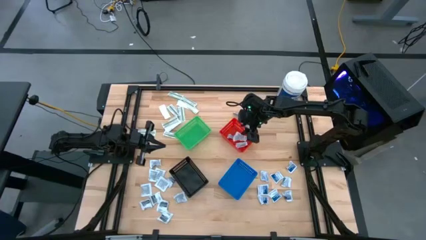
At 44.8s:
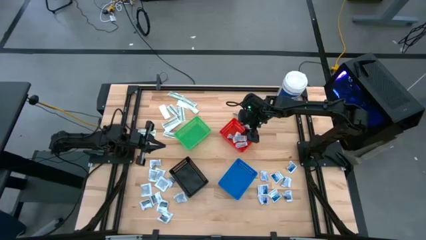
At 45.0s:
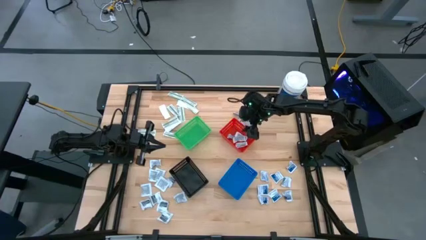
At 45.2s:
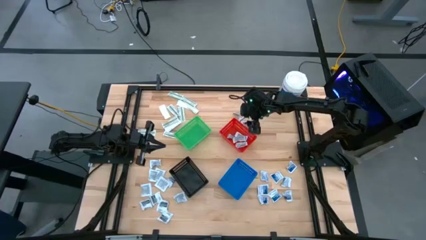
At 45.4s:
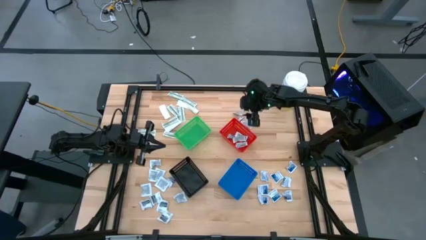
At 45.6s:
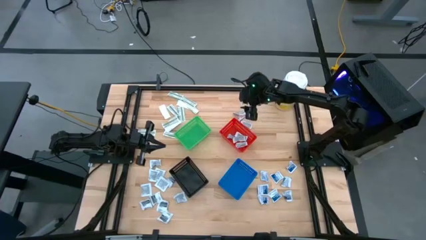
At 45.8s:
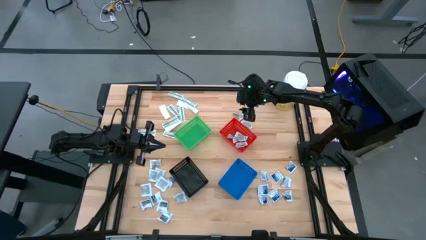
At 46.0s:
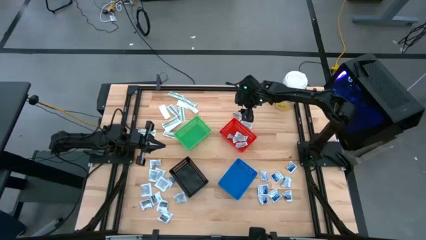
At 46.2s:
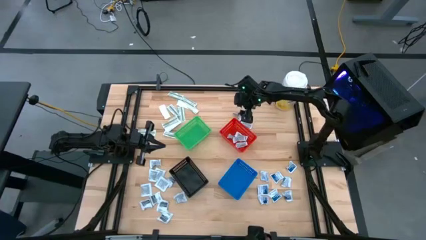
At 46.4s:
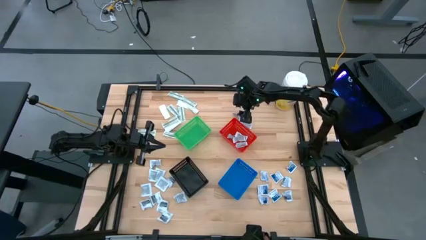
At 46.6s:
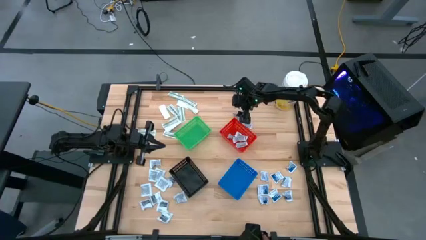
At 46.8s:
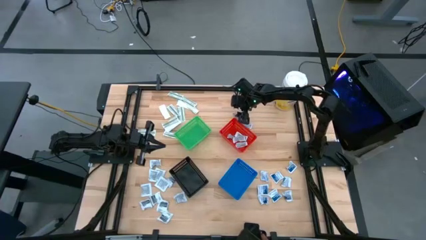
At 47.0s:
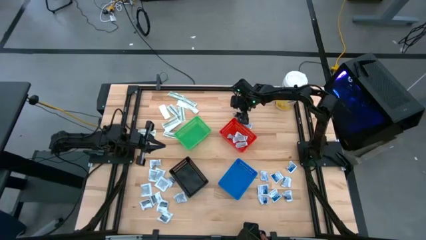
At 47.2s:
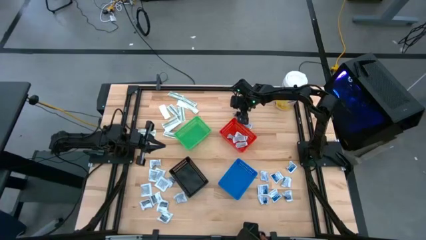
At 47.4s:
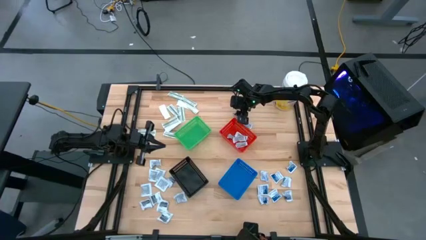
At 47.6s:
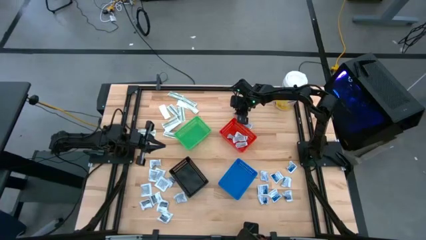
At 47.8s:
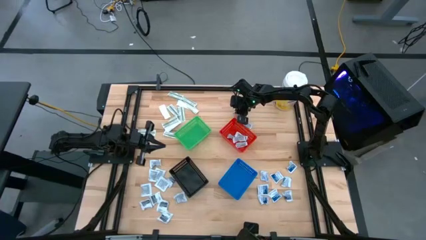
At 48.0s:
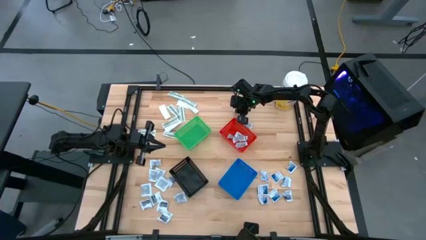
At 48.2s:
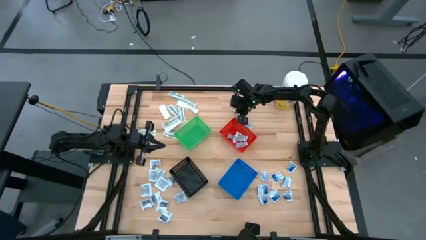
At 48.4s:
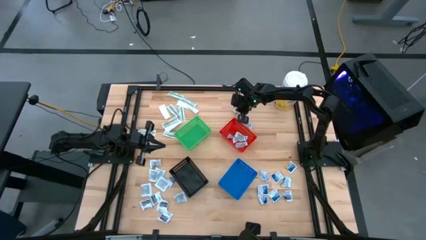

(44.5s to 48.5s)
Task: Pick & Place First Aid Supplies
Put the orange ointment pack into the red bin

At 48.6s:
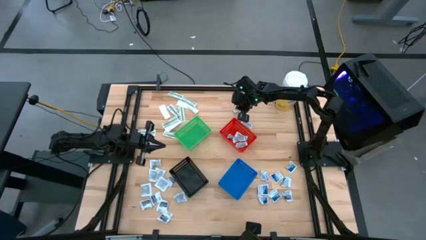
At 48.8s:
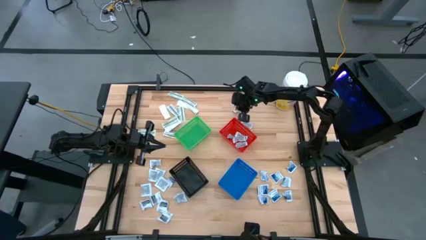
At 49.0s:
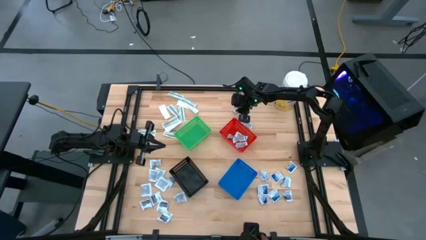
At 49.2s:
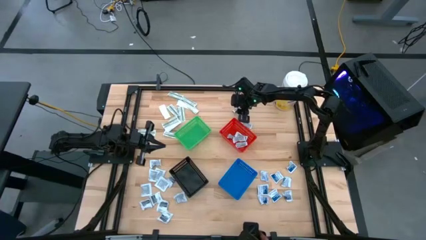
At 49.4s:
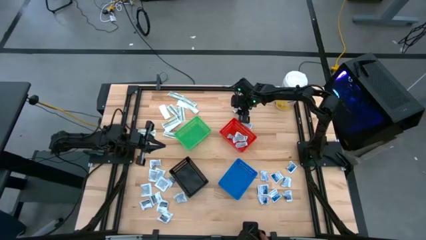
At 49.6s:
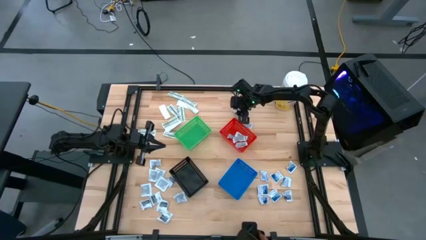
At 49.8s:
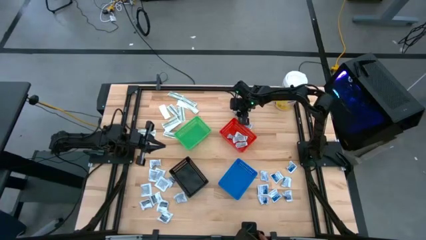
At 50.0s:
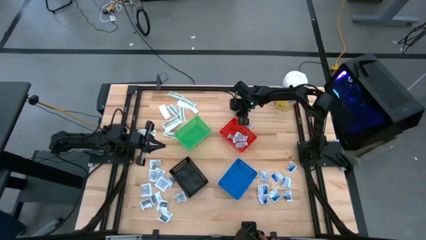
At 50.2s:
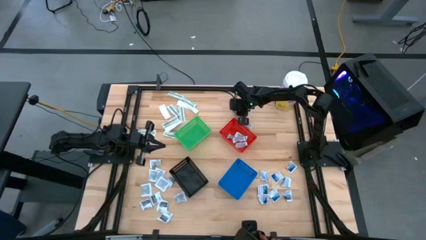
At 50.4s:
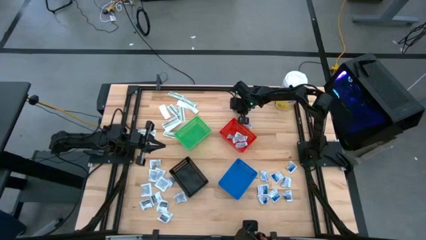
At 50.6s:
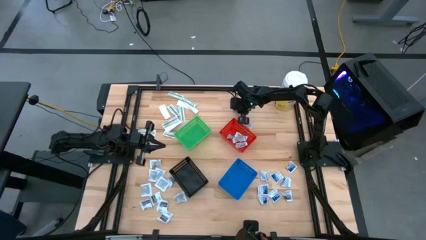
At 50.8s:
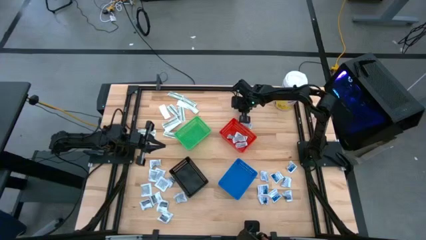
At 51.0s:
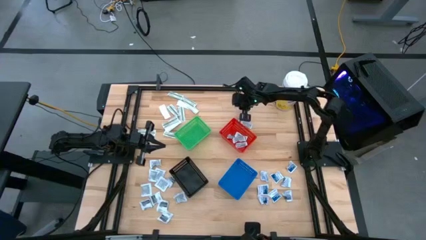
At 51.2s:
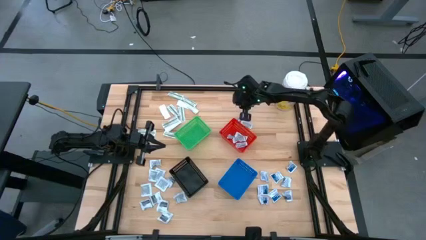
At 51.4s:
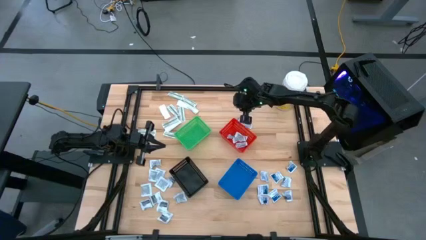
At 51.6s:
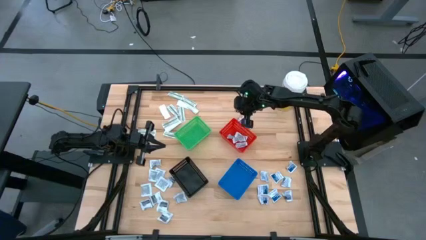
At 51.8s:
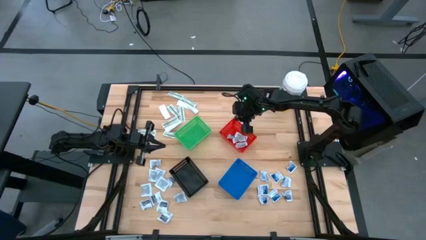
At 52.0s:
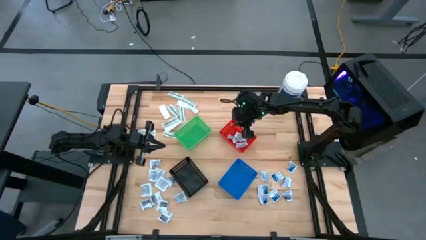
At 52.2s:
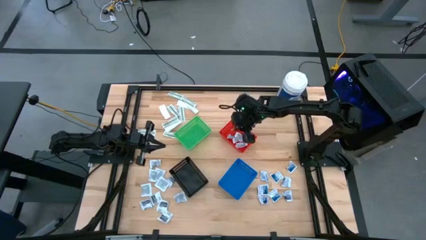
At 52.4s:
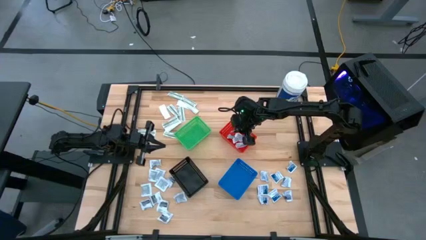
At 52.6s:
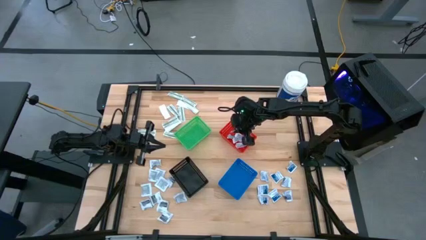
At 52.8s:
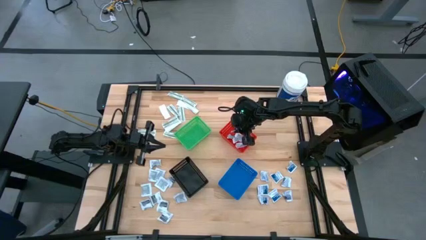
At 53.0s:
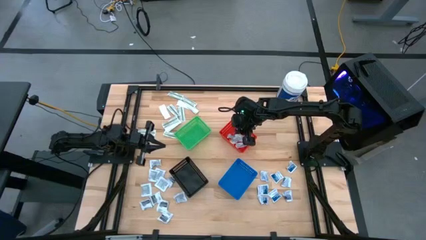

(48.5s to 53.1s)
Put the orange ointment pack into the red bin

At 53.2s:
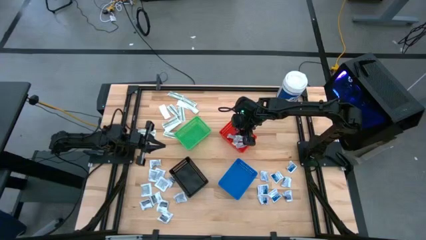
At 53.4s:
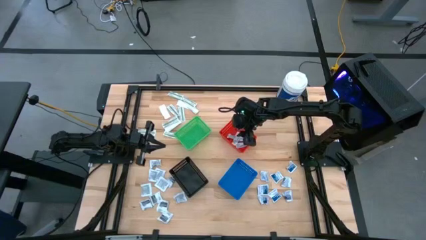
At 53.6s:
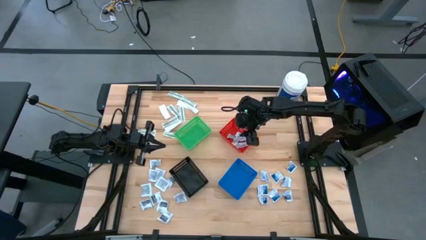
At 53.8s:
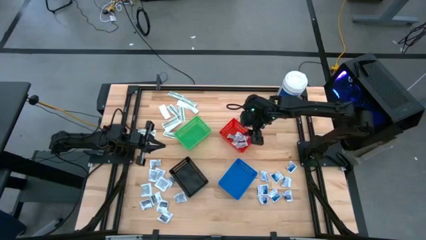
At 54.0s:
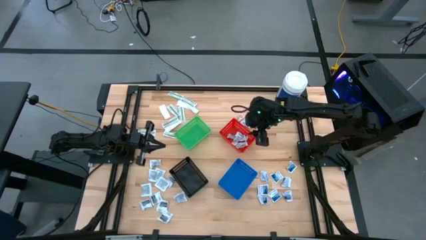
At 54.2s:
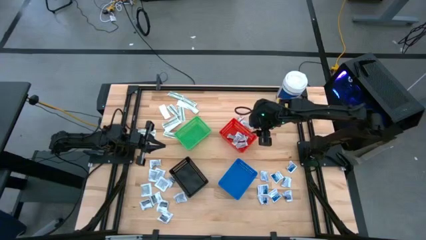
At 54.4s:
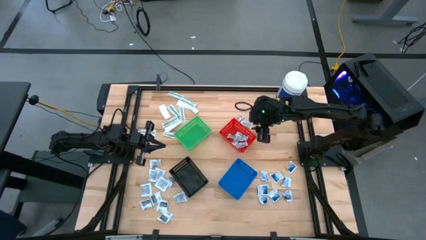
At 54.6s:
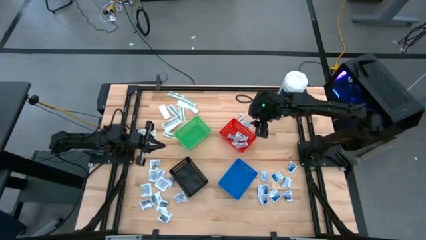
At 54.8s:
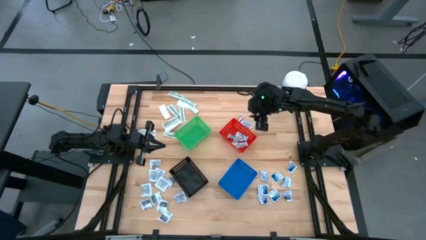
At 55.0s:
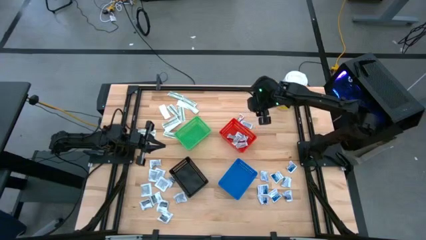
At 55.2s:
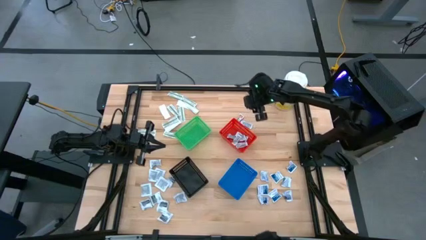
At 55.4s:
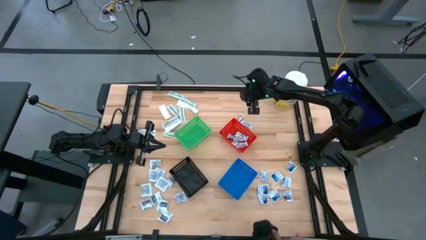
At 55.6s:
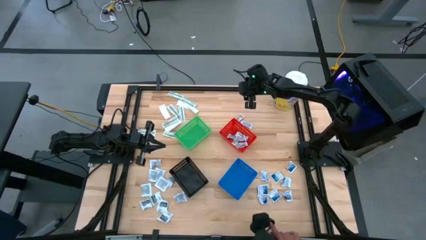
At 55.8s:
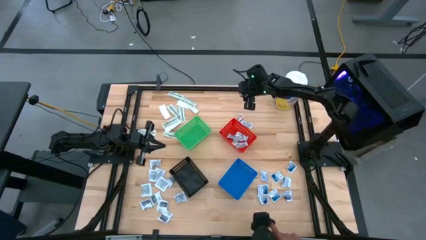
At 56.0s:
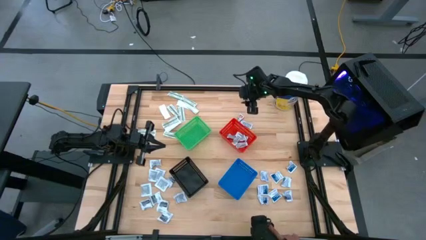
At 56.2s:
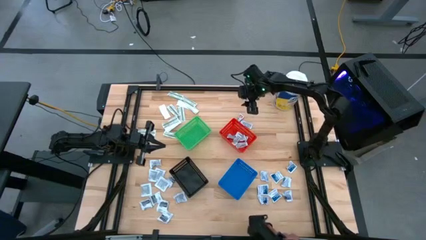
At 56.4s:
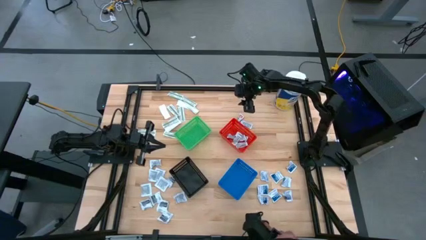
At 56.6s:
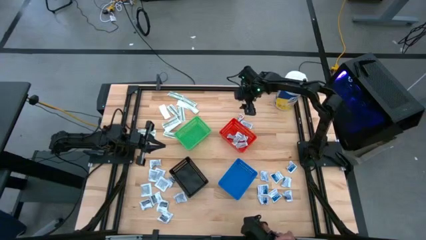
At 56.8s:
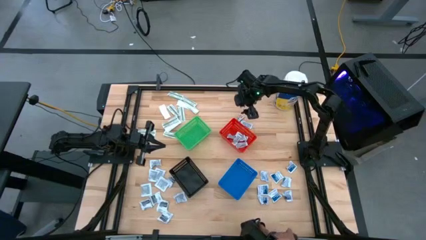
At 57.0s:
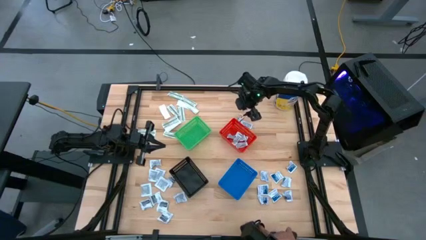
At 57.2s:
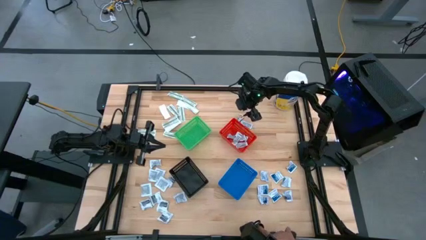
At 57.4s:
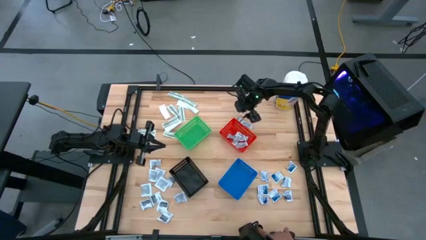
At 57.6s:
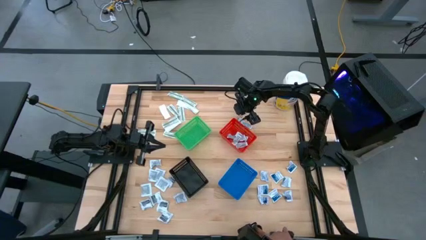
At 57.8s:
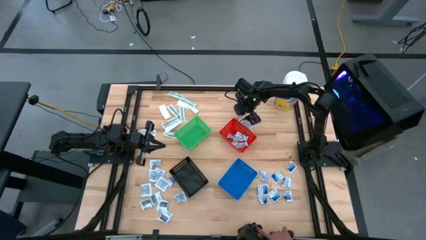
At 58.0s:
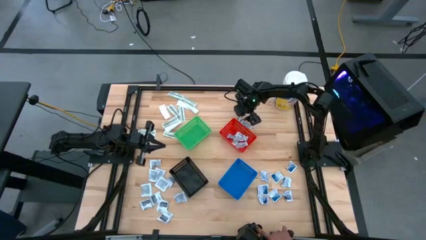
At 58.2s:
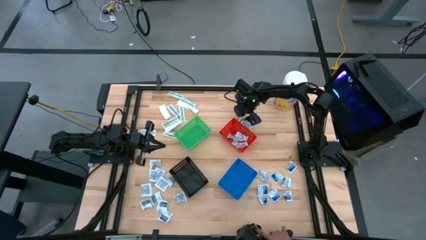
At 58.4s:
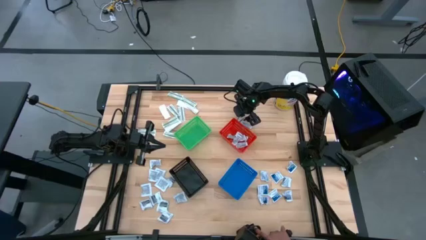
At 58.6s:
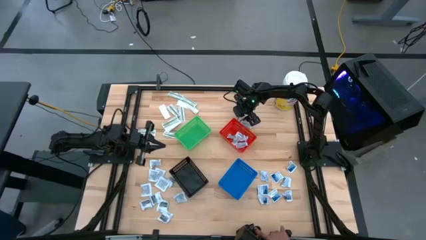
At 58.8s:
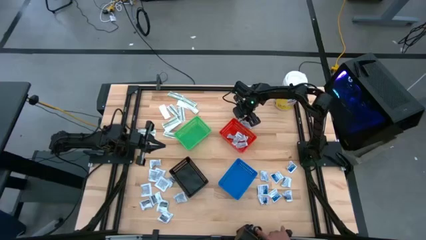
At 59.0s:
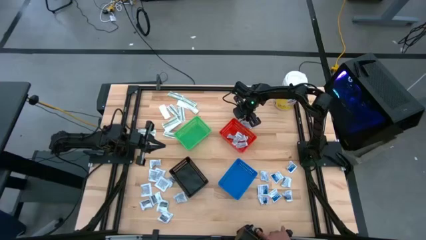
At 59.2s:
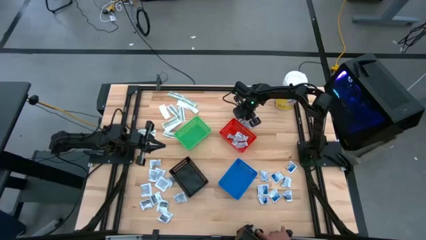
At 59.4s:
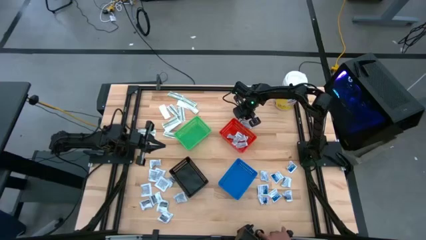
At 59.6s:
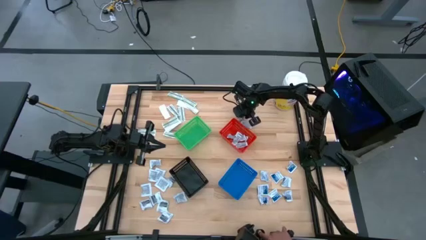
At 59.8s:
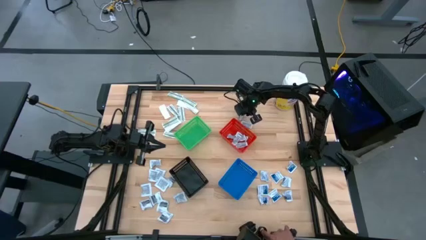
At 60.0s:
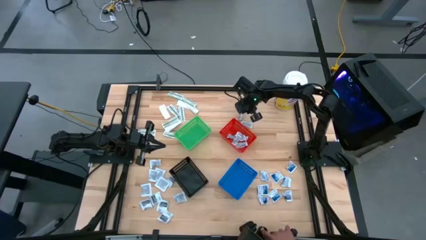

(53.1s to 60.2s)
Put the orange ointment pack into the red bin
